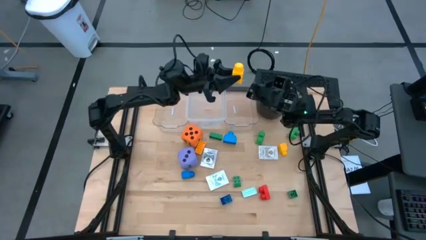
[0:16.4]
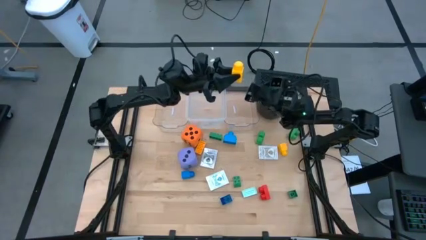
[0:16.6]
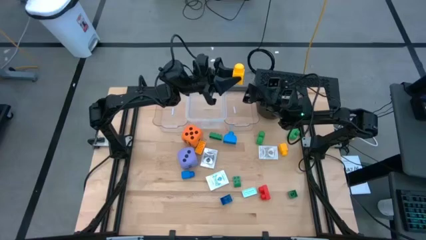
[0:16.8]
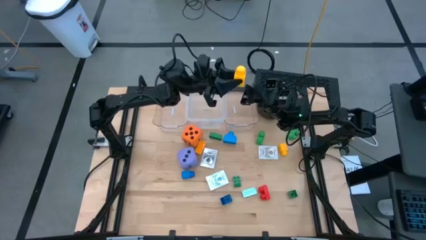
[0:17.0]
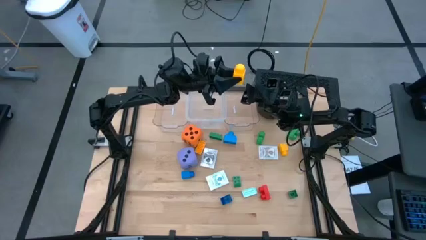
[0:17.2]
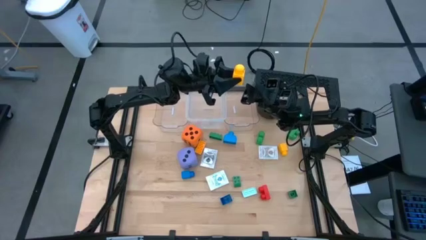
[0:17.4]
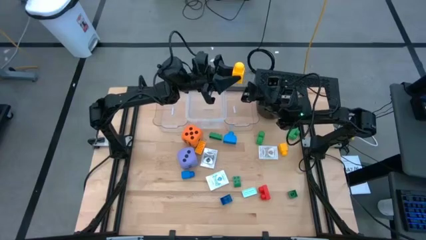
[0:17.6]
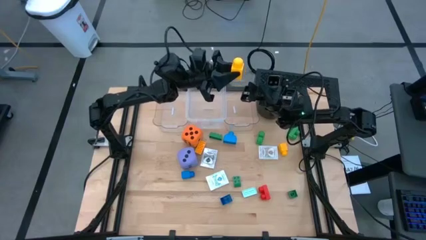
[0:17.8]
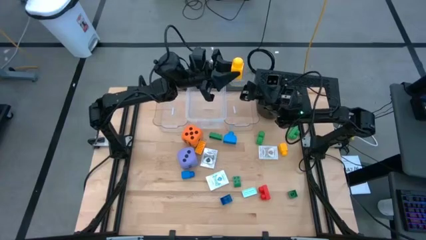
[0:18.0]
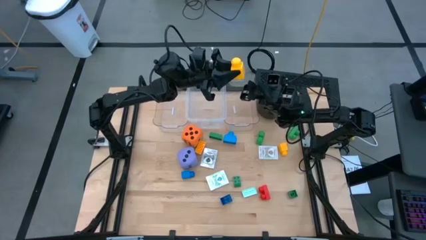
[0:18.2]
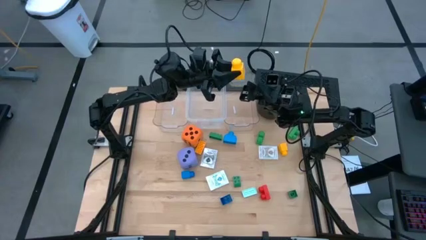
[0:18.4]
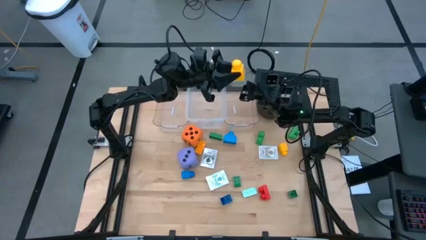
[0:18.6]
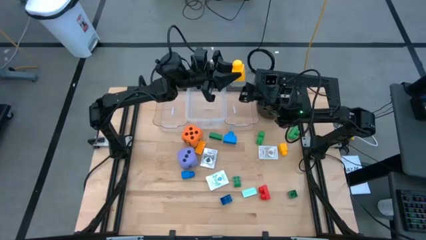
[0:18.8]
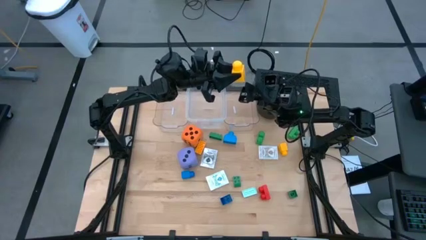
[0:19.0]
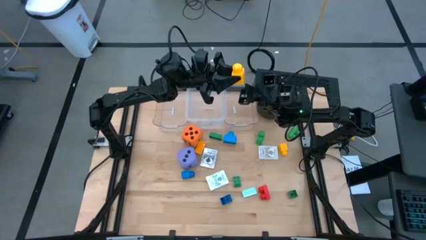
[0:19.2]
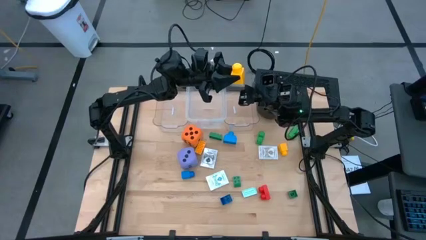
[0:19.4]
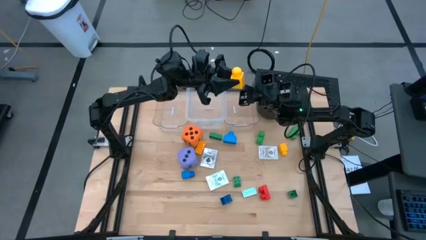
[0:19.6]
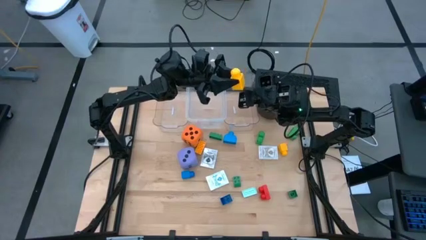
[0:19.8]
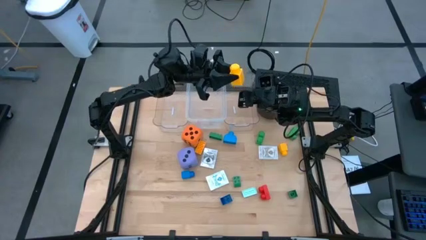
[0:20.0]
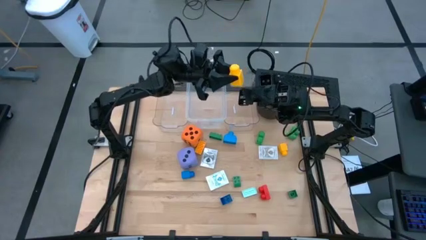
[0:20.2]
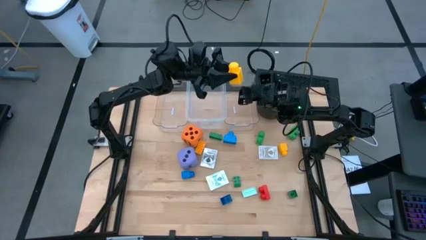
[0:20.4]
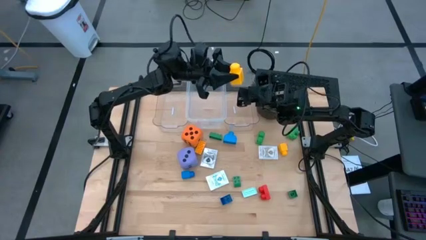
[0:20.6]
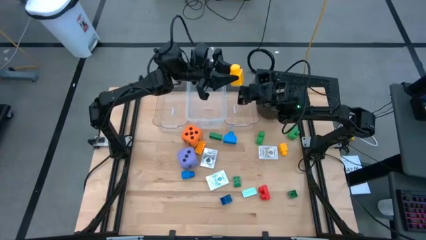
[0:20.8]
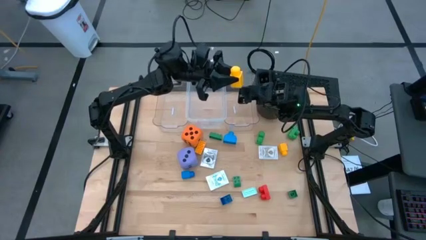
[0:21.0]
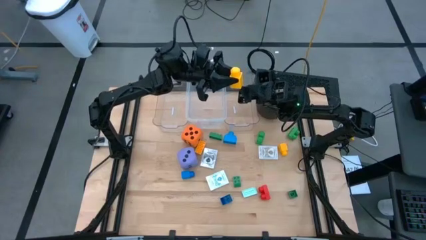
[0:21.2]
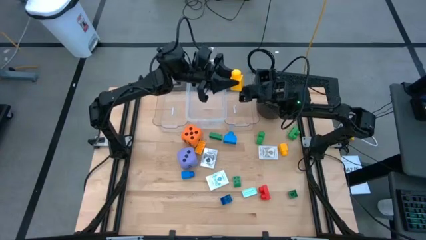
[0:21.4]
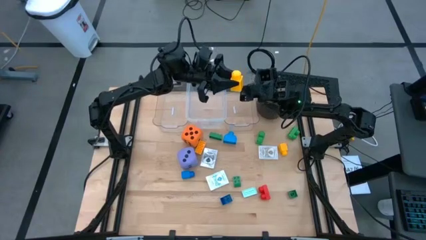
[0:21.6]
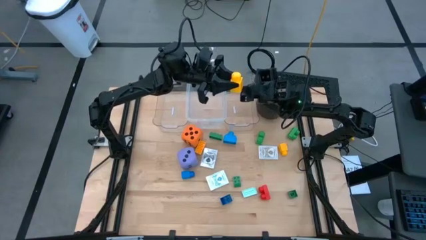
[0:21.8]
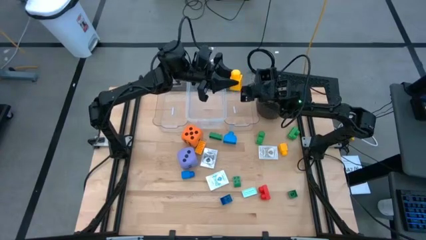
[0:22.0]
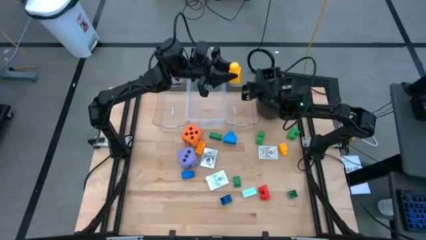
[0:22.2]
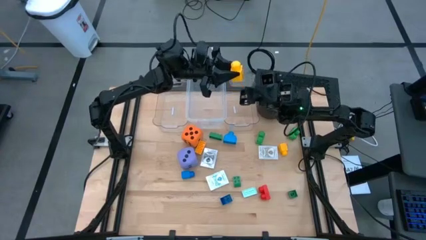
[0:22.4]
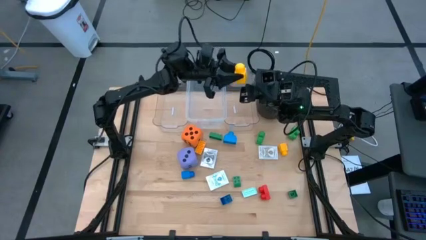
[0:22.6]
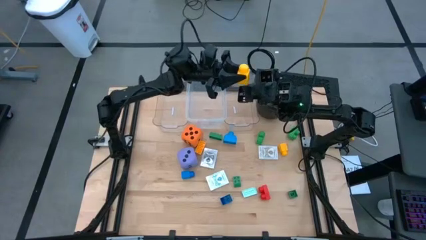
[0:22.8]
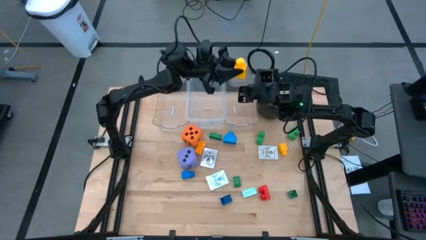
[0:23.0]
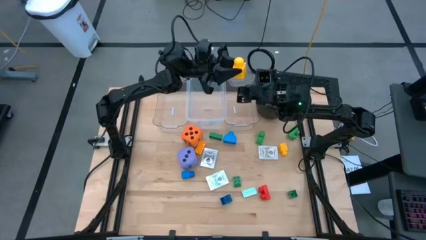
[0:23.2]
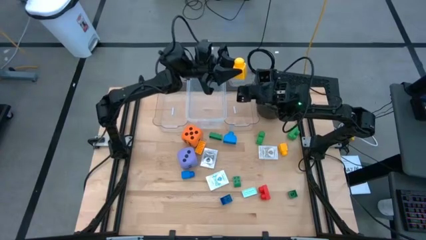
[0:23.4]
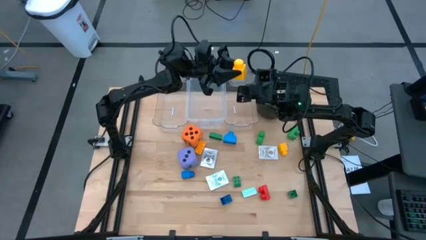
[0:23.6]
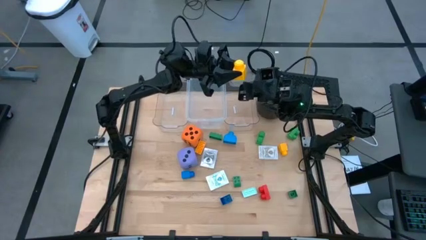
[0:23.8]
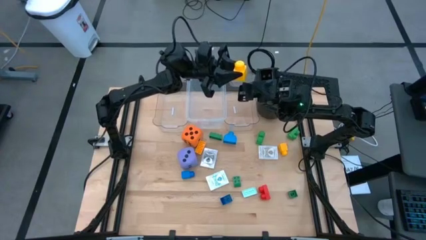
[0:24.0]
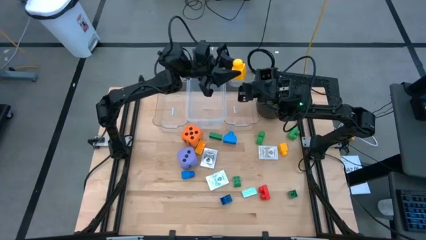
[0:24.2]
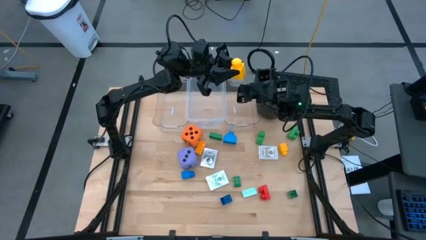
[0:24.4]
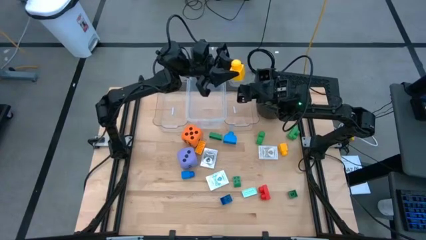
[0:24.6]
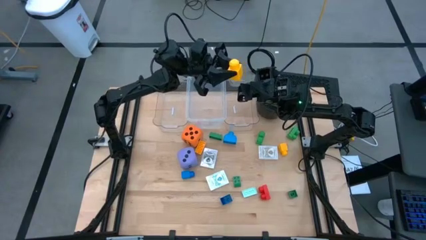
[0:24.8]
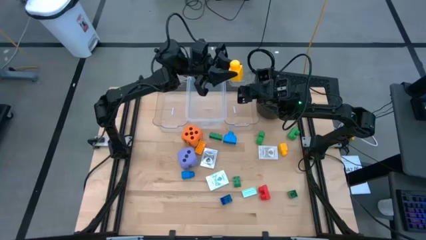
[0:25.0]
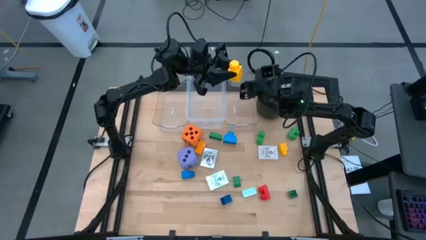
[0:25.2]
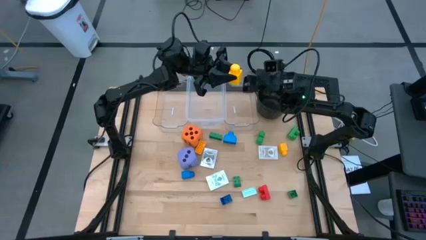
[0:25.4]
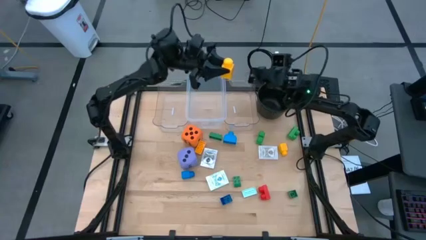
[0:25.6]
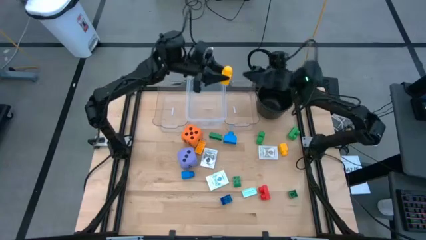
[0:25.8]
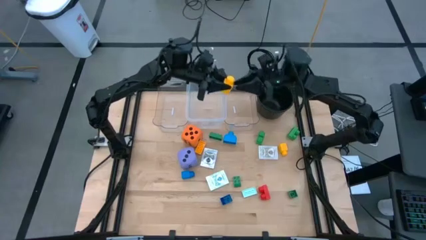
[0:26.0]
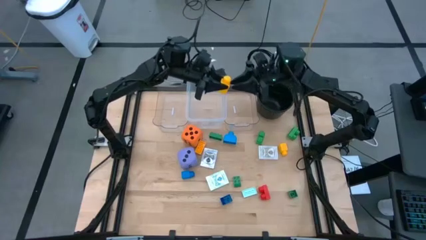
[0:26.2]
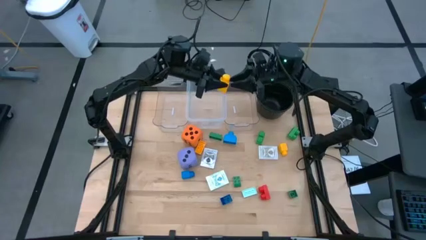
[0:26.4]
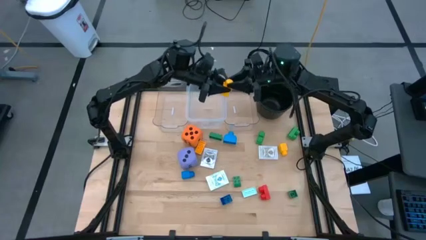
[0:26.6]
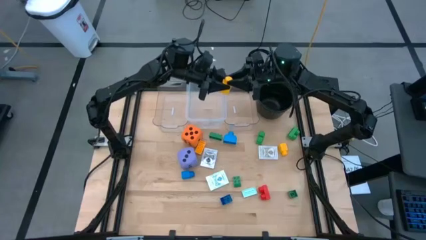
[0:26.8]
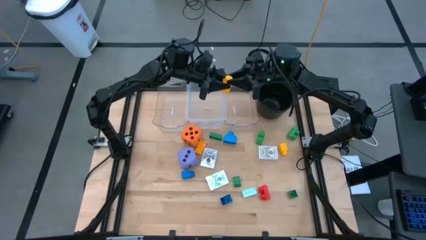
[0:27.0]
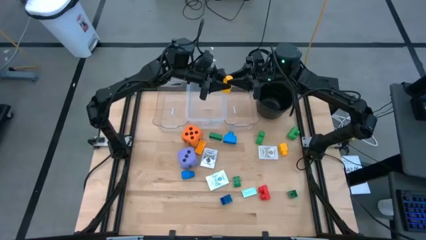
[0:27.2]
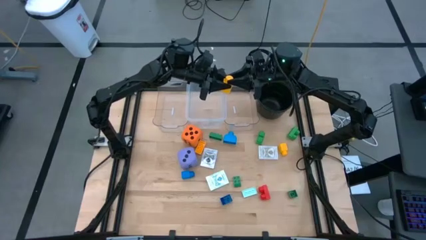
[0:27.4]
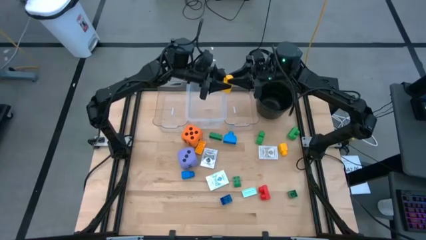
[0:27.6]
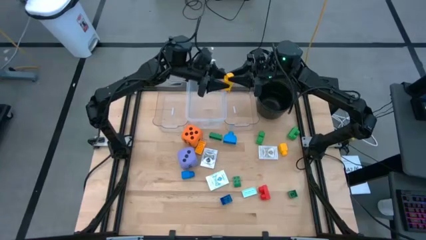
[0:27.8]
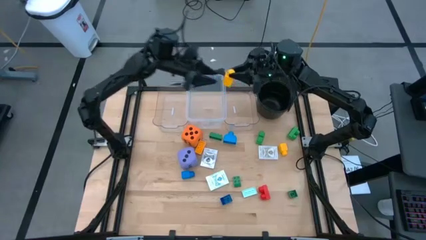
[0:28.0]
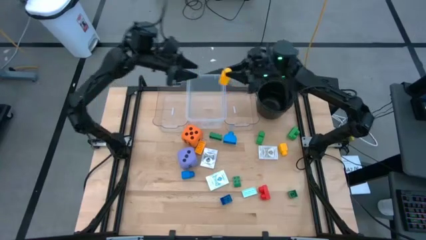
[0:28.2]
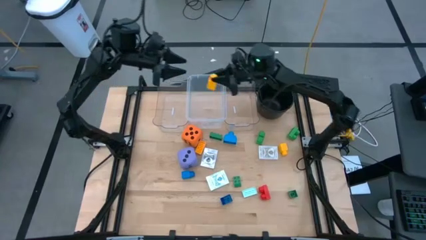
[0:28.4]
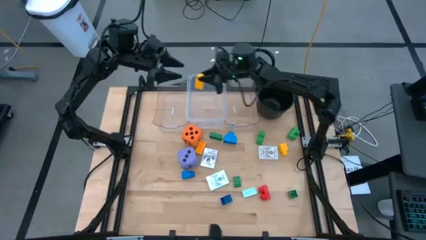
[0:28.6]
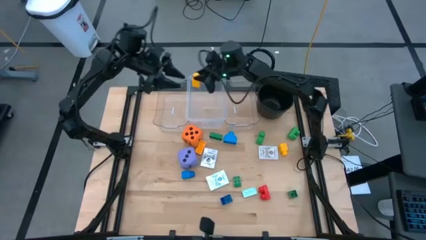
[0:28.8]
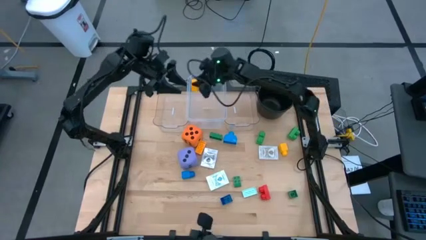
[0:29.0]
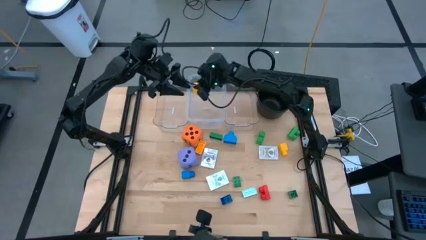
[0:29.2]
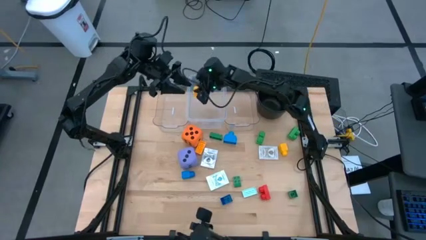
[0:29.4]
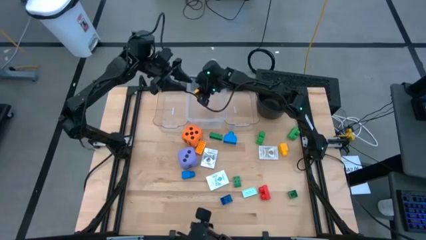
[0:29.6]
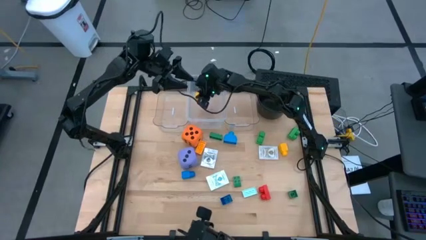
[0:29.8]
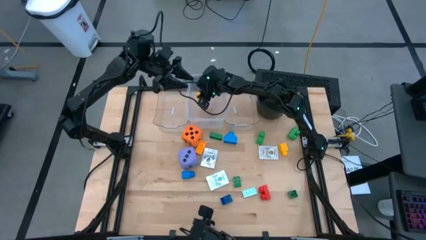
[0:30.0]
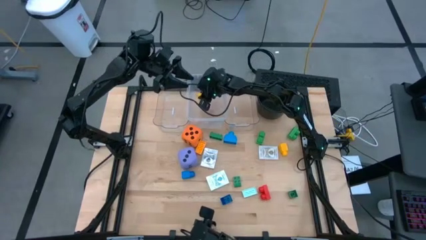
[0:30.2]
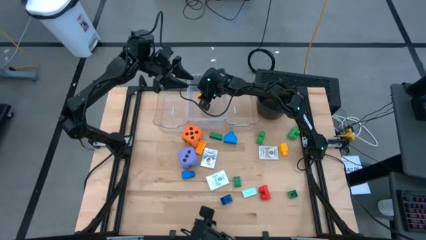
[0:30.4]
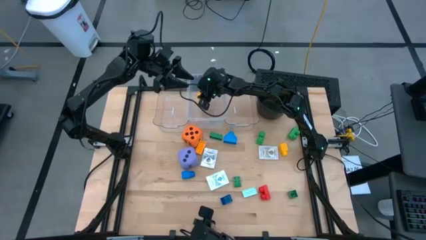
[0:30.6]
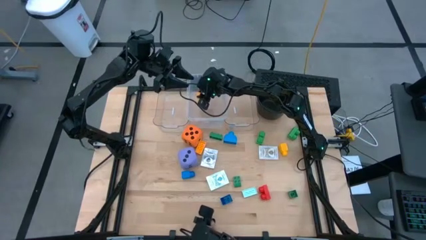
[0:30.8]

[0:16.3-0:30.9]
Task: Pick & Place Toys
Put the yellow one stud game piece into the middle transparent bin
